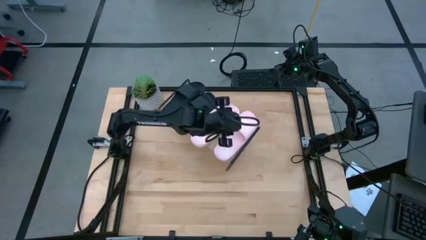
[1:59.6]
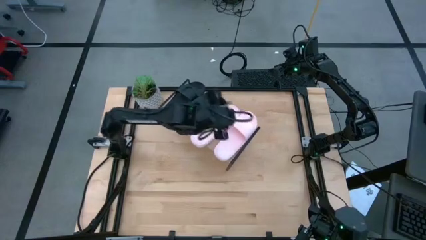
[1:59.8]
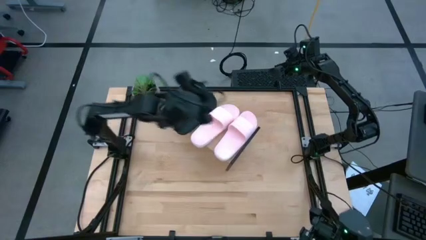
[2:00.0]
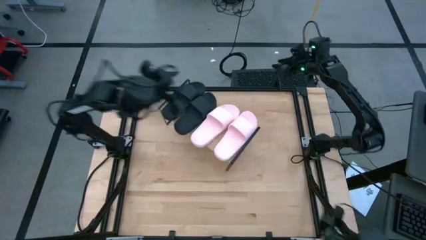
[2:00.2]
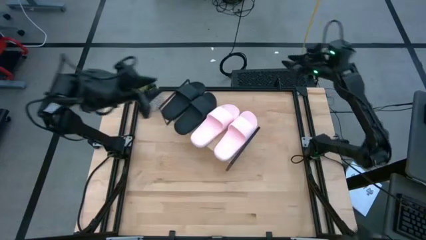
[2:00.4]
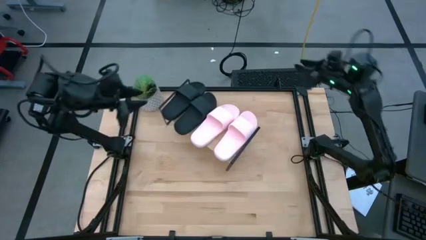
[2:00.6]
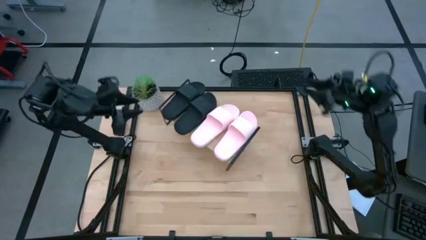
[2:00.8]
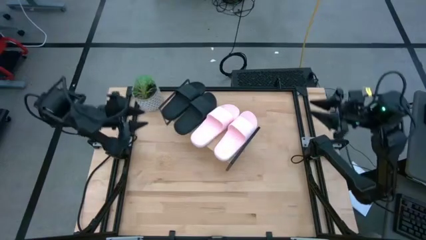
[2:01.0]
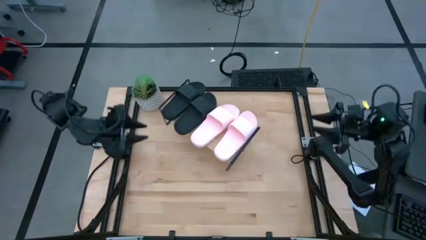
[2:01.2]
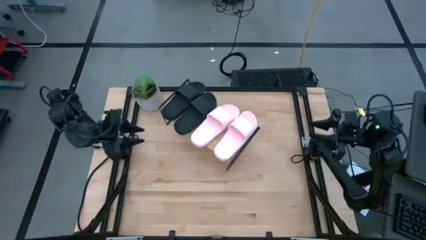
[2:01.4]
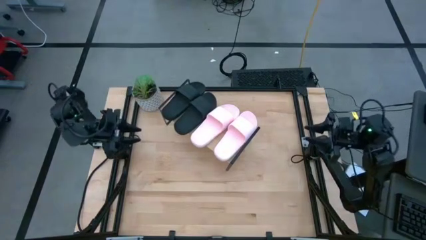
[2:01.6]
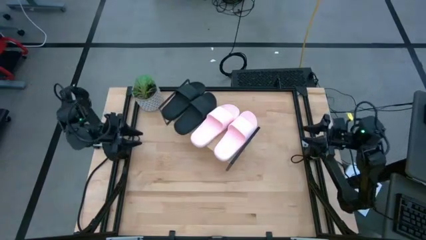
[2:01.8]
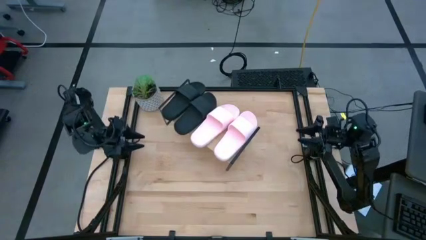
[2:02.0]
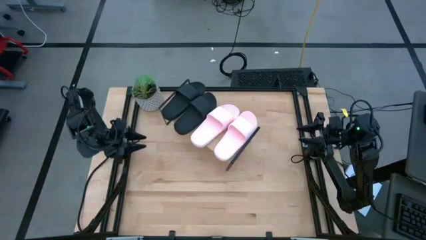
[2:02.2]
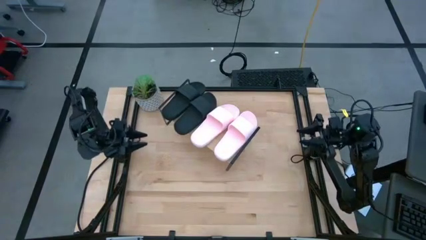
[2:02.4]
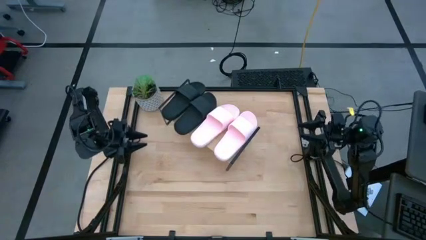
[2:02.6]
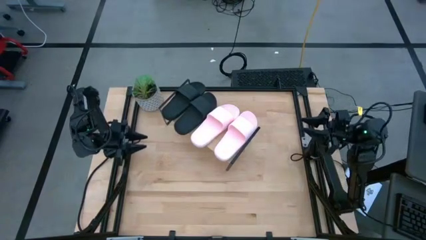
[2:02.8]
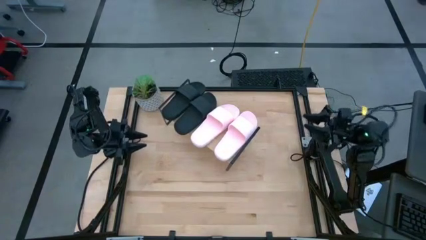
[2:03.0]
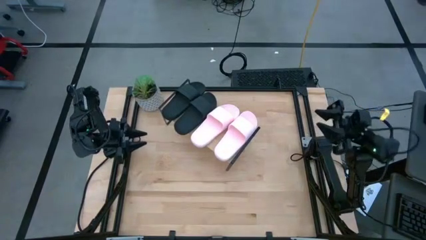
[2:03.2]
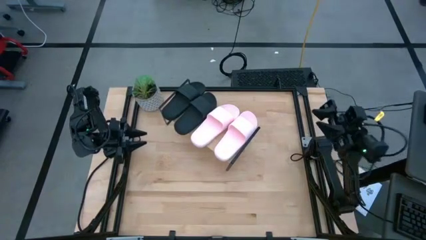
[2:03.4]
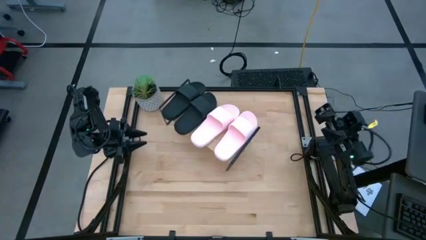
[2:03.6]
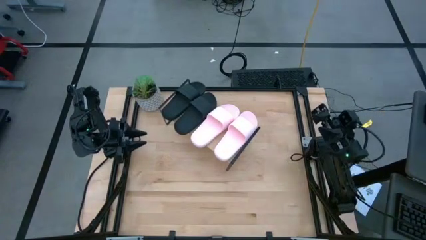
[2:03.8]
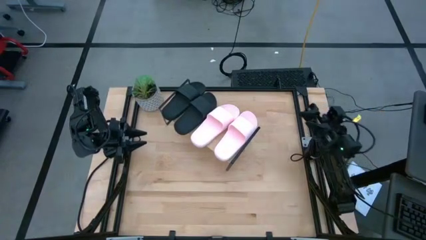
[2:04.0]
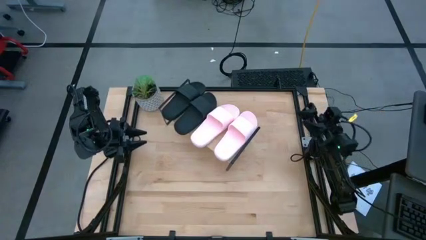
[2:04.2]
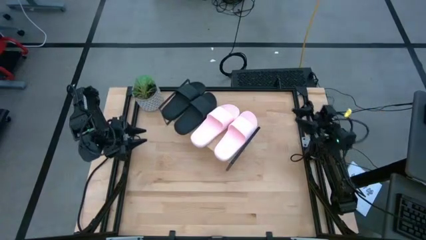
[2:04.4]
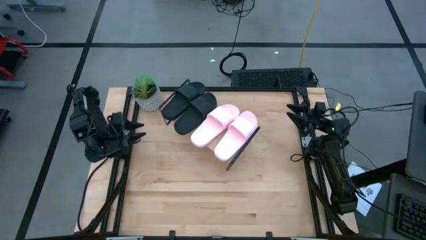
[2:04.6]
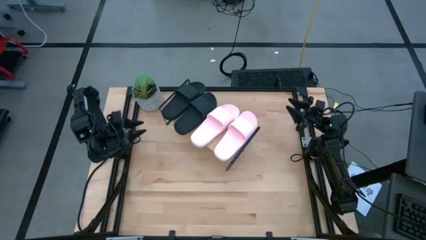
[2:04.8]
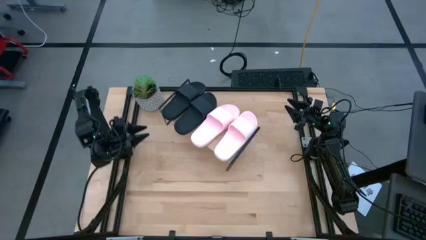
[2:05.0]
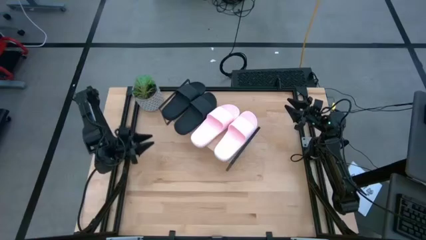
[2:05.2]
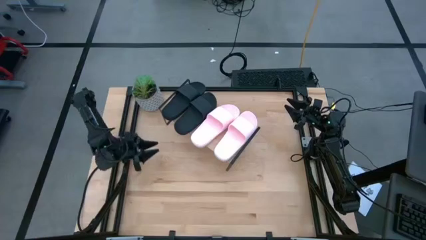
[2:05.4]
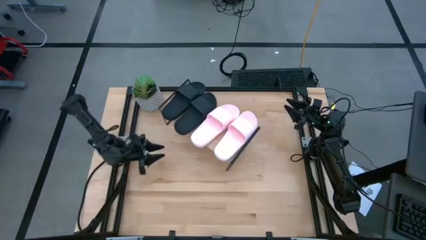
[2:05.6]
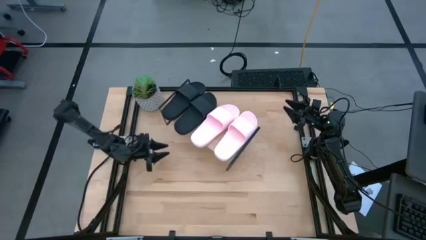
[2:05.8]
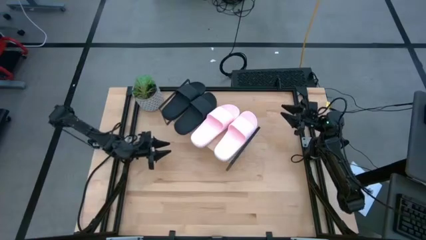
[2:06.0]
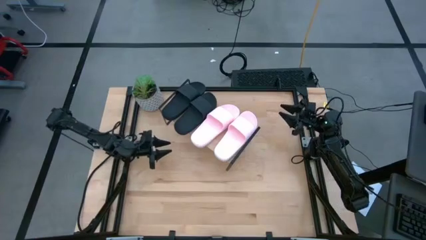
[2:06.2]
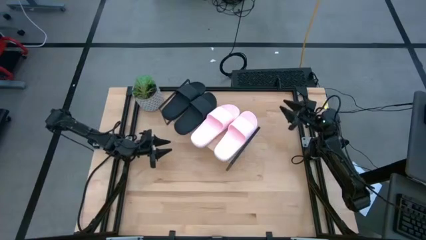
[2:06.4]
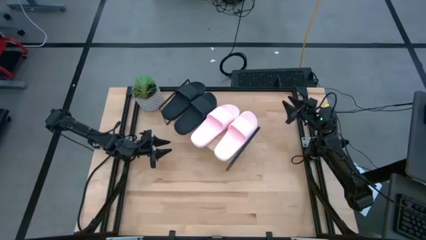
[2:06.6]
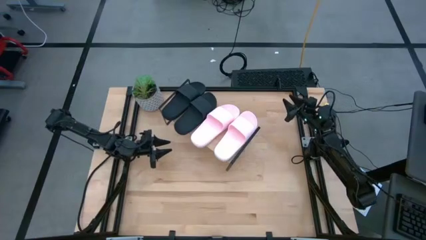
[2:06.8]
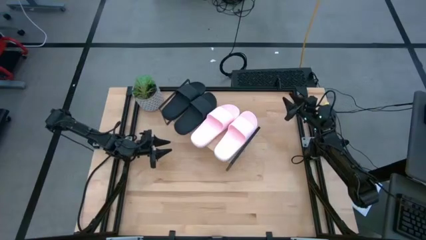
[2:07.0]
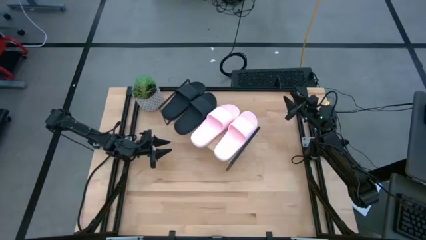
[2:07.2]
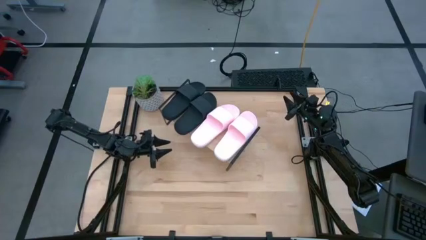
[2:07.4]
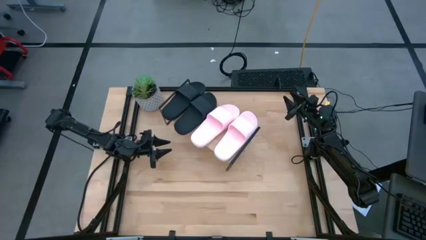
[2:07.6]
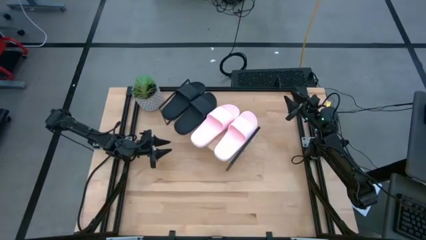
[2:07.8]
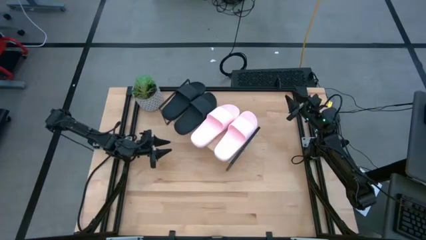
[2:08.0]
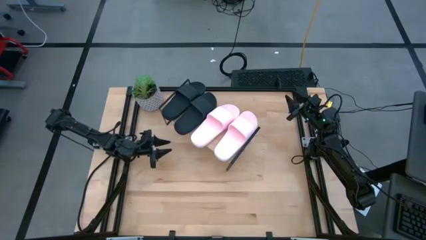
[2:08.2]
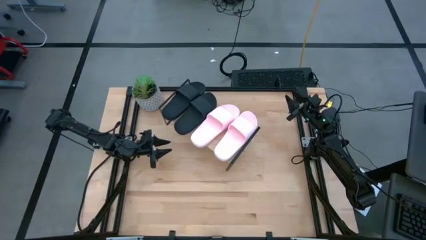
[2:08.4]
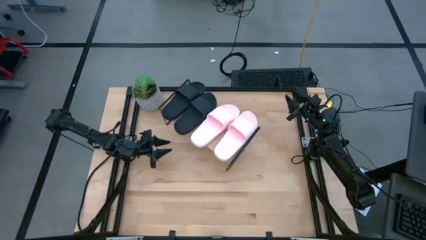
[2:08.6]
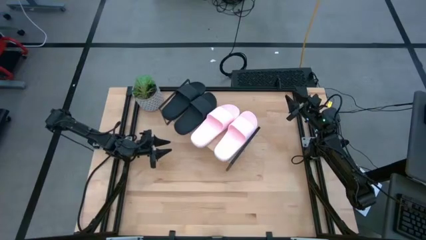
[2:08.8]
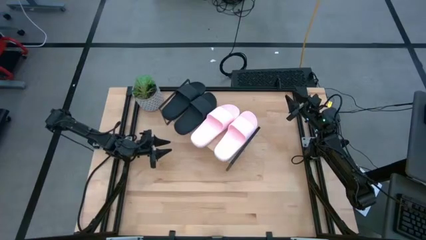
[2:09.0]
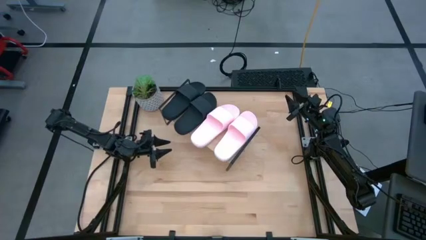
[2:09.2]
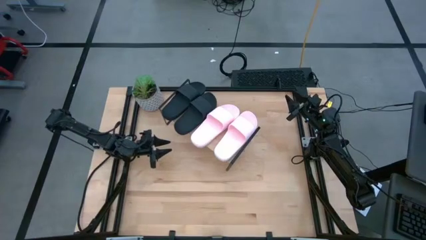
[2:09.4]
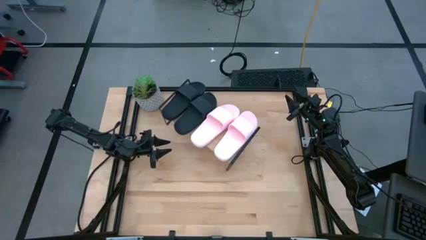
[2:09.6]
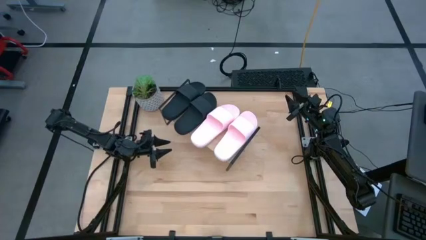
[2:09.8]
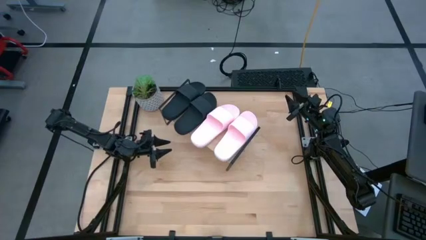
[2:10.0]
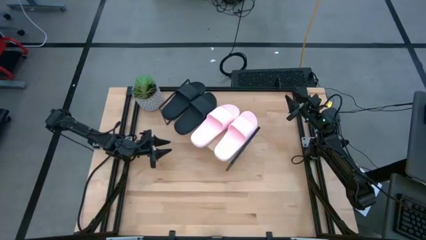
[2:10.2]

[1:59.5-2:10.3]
Task: Pick and place slides into the shelf
Return to Home Position

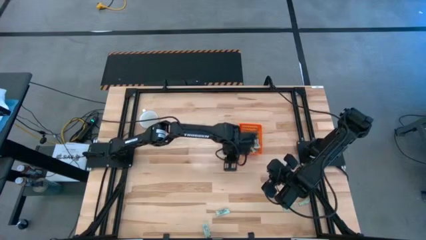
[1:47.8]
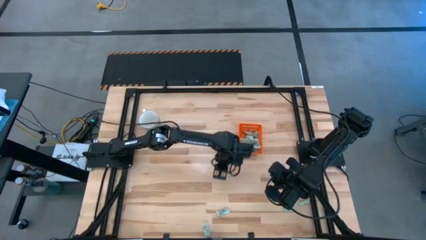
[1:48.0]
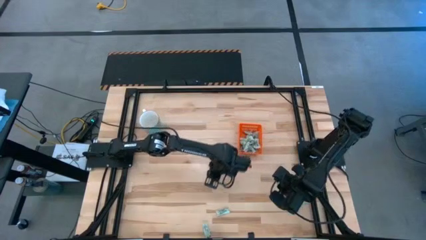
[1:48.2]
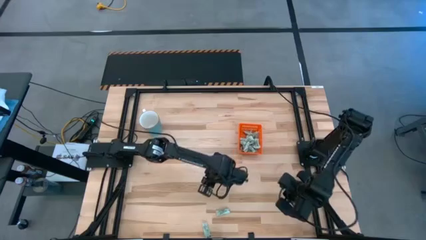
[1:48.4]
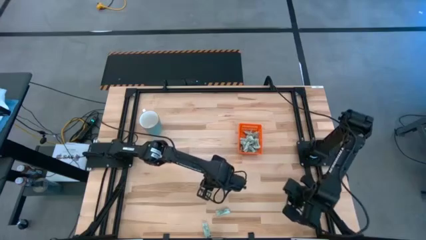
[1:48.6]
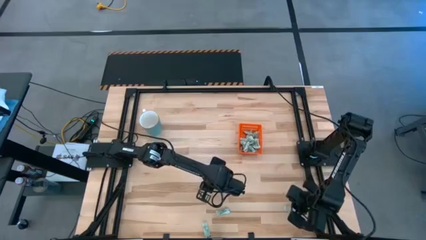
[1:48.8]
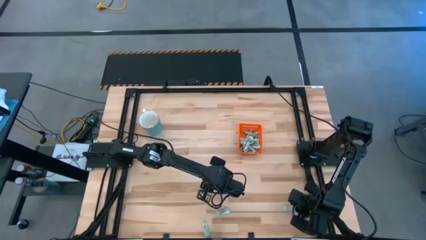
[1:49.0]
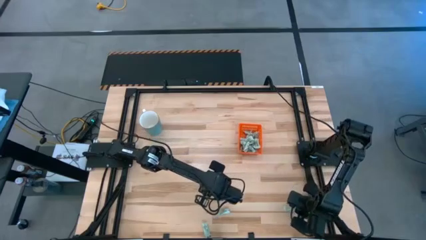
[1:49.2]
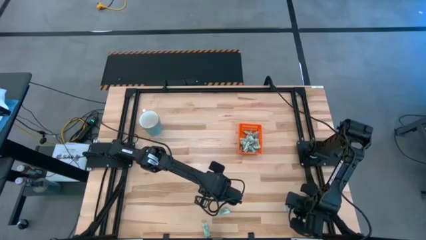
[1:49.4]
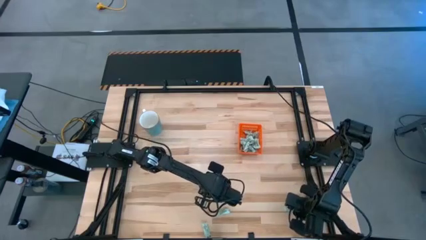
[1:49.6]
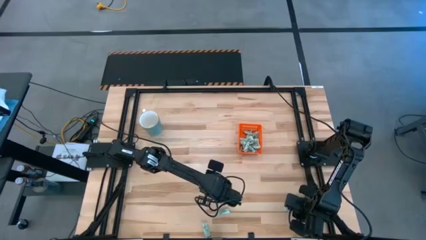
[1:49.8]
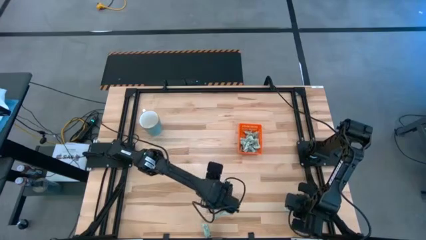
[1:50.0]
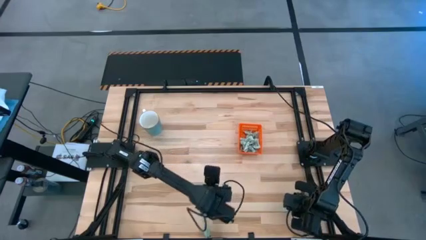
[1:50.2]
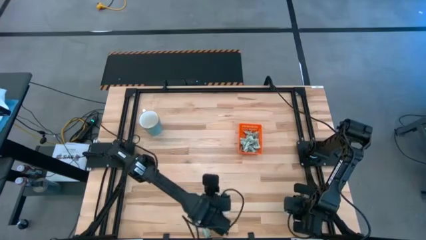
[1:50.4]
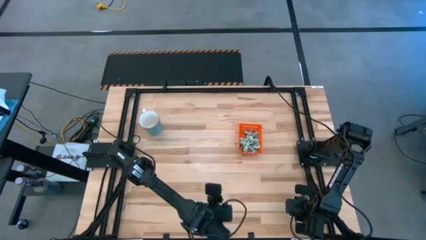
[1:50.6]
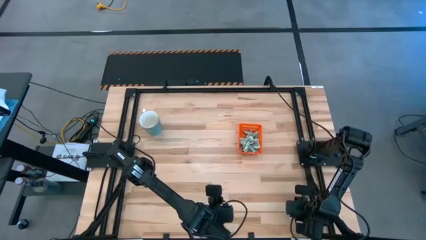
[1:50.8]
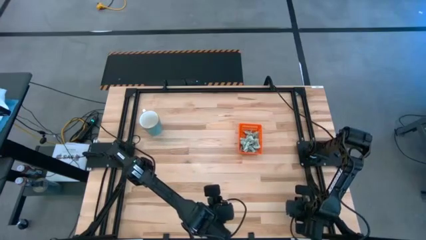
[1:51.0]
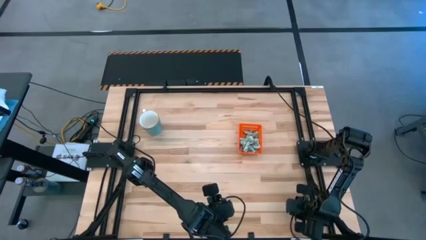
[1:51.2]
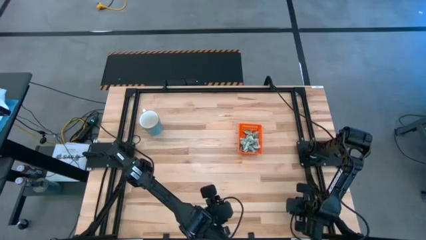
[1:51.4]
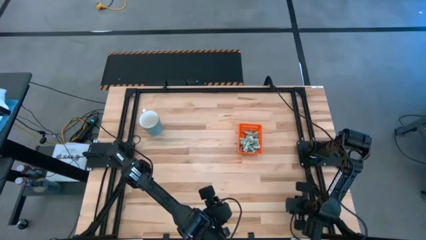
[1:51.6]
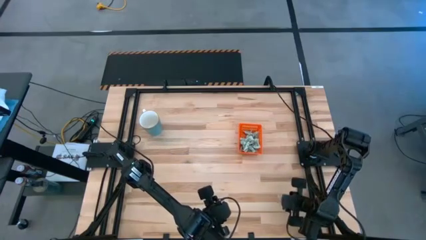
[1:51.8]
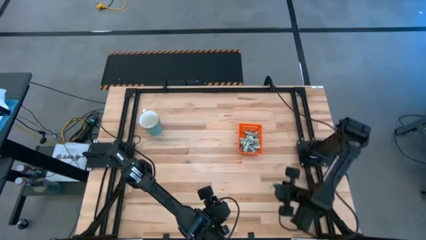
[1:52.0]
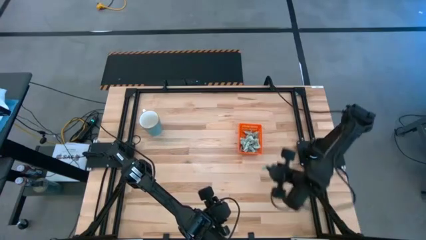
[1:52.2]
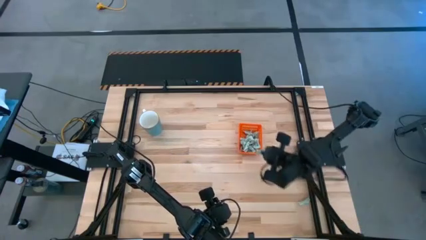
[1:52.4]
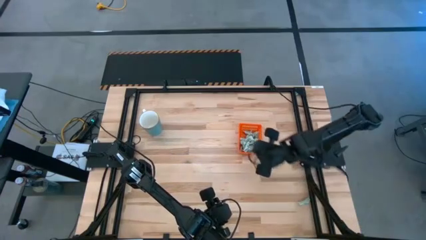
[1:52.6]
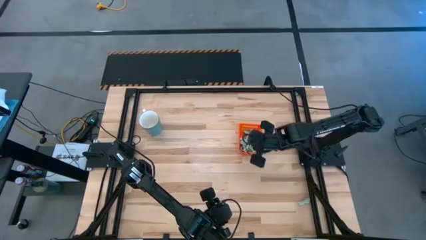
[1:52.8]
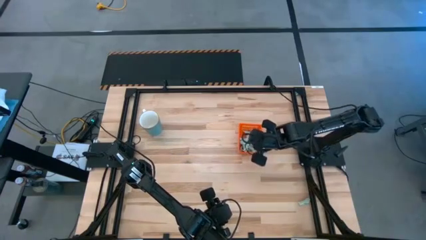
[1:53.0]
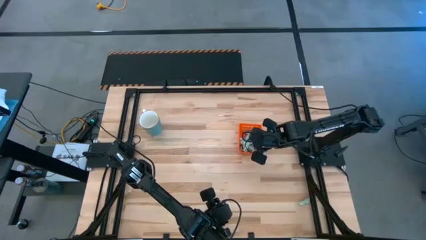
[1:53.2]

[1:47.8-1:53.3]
Task: Pick and place Stevia / Truvia into bins
Put the stevia packet into the orange bin
